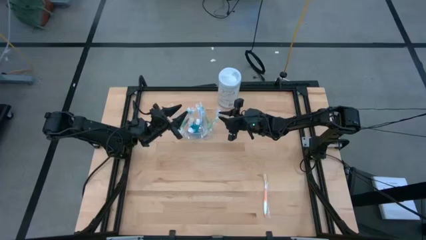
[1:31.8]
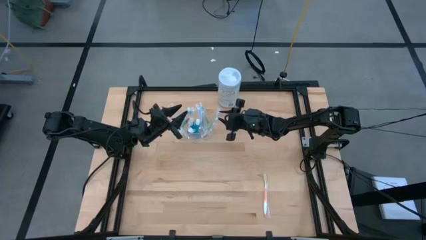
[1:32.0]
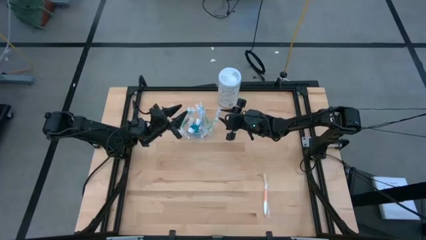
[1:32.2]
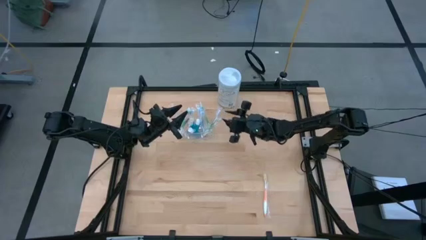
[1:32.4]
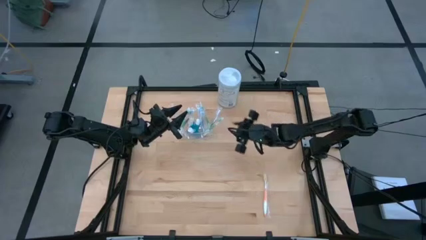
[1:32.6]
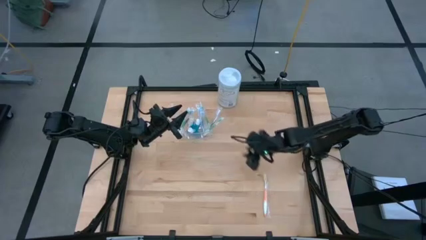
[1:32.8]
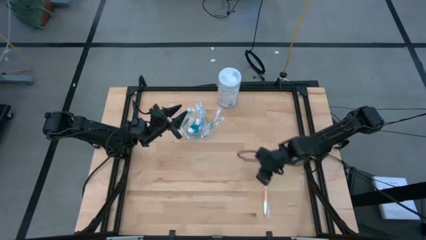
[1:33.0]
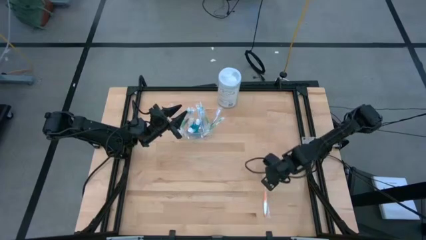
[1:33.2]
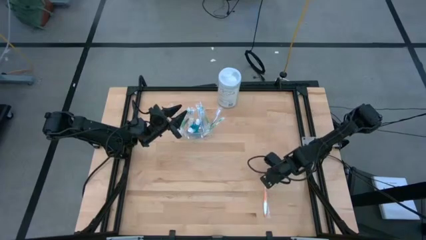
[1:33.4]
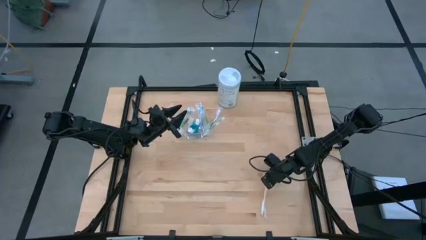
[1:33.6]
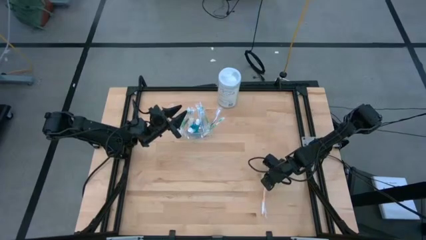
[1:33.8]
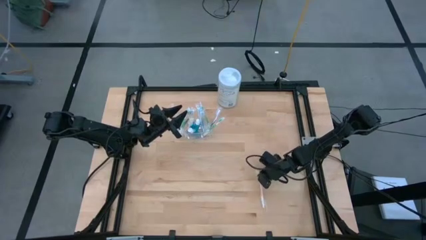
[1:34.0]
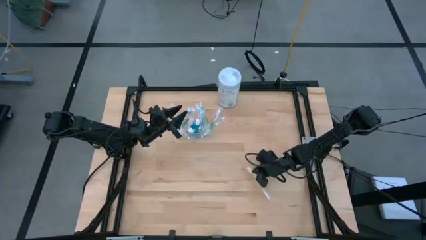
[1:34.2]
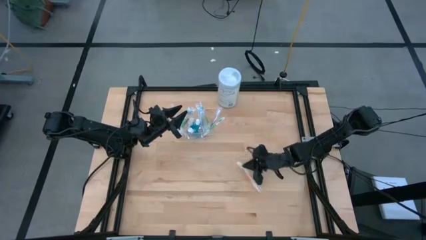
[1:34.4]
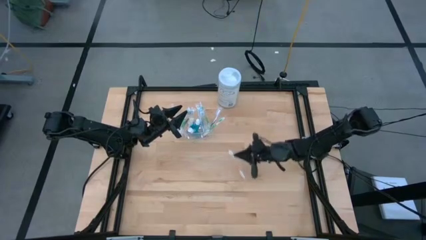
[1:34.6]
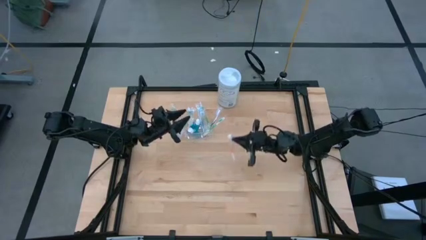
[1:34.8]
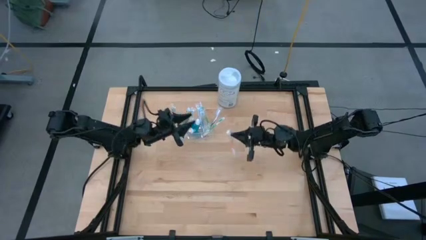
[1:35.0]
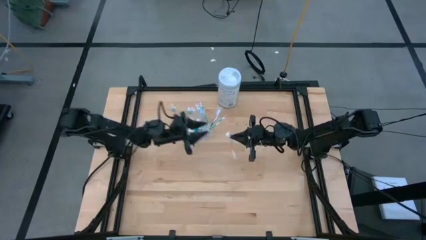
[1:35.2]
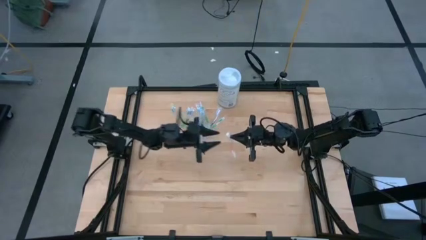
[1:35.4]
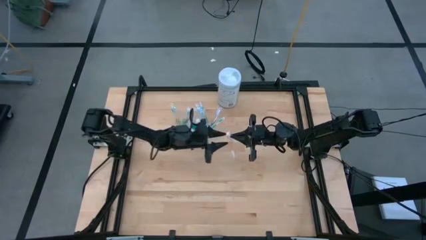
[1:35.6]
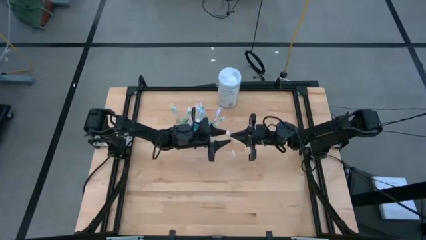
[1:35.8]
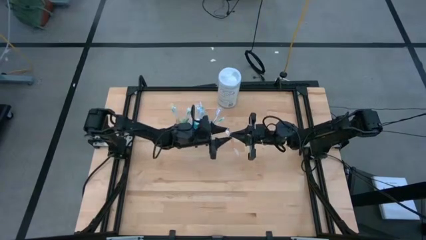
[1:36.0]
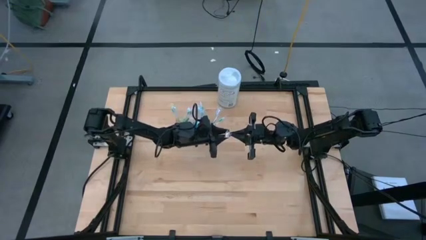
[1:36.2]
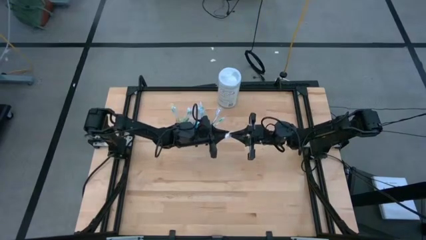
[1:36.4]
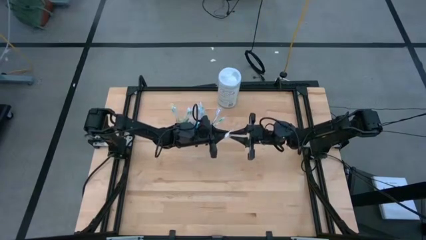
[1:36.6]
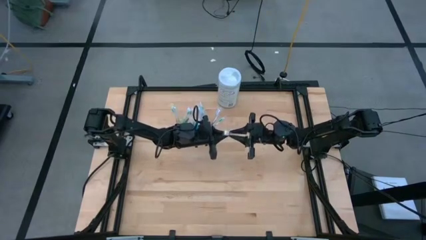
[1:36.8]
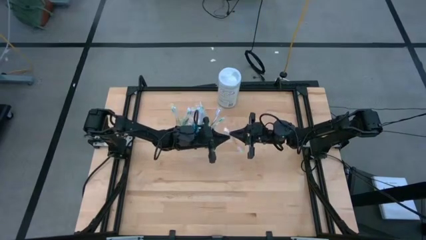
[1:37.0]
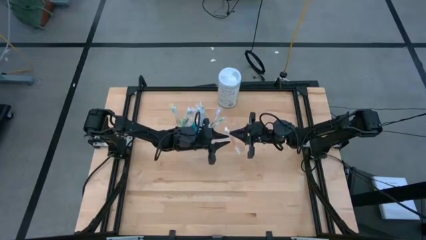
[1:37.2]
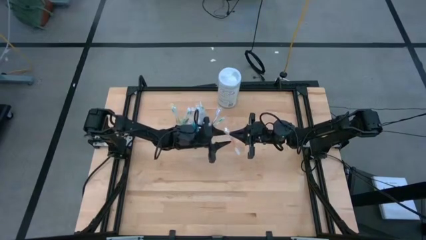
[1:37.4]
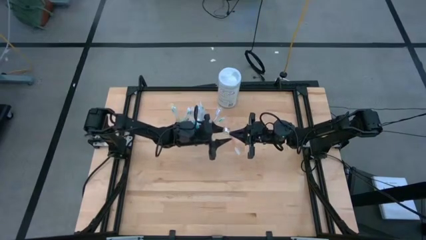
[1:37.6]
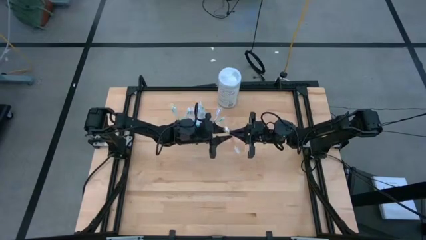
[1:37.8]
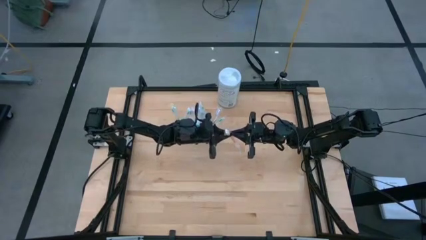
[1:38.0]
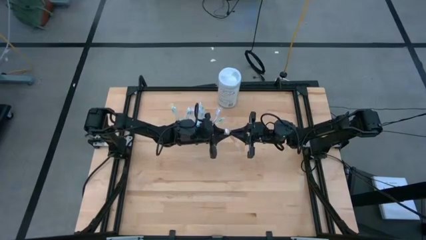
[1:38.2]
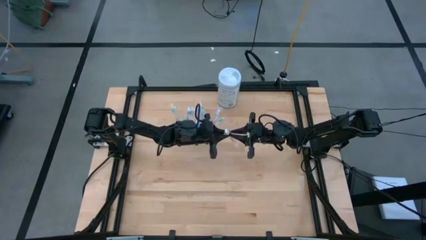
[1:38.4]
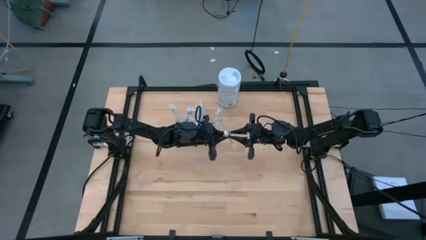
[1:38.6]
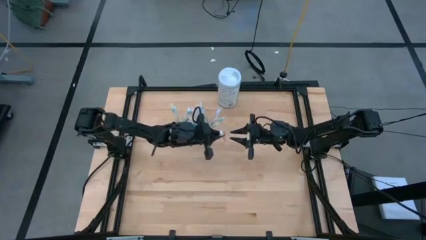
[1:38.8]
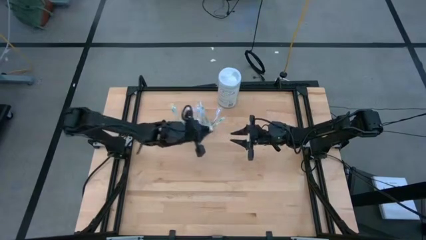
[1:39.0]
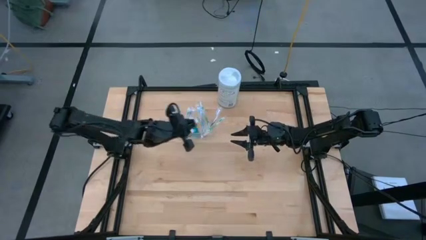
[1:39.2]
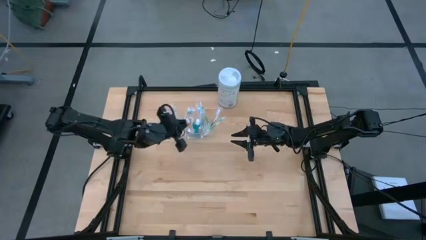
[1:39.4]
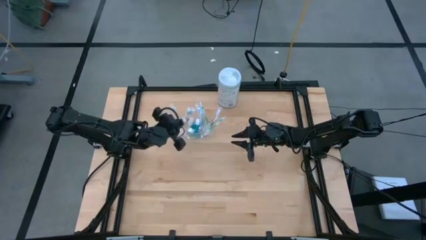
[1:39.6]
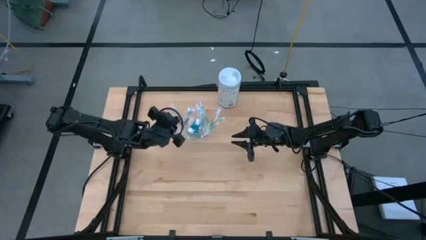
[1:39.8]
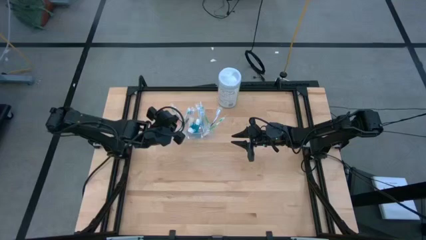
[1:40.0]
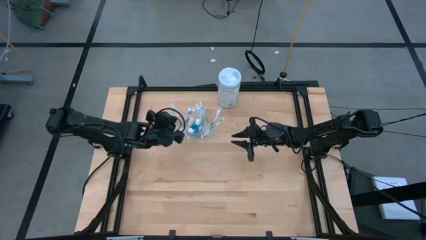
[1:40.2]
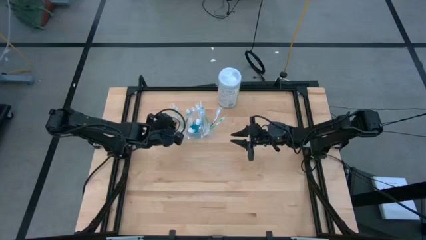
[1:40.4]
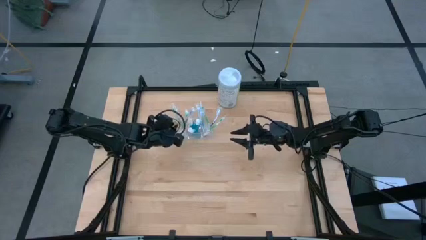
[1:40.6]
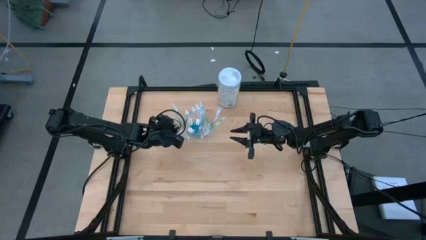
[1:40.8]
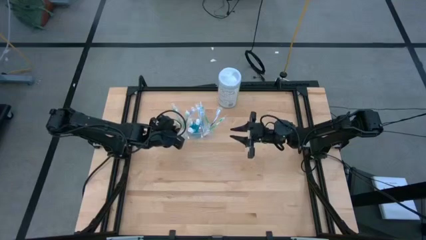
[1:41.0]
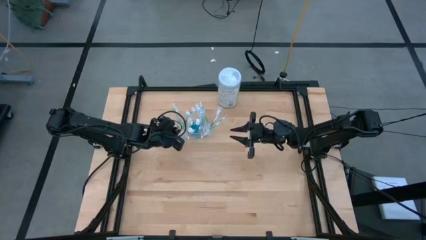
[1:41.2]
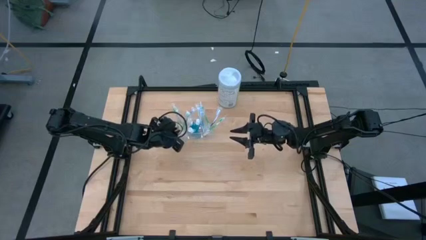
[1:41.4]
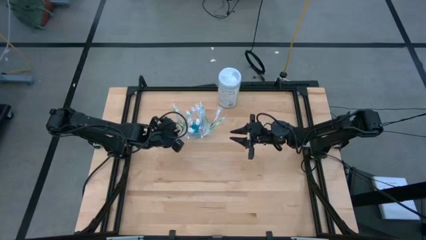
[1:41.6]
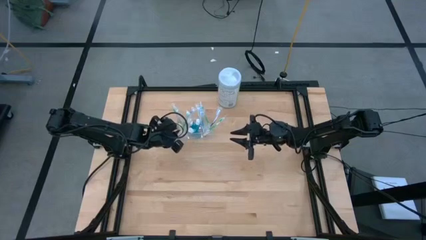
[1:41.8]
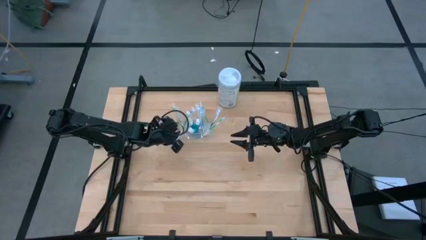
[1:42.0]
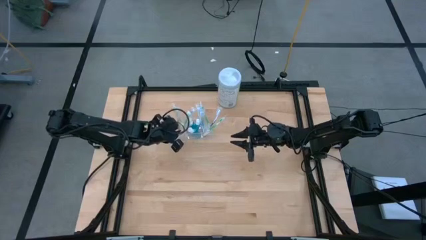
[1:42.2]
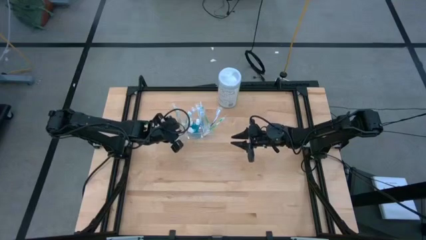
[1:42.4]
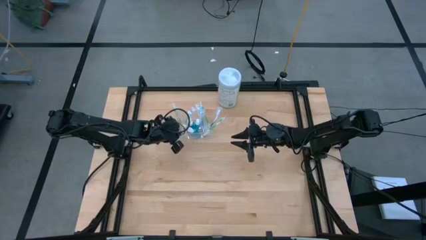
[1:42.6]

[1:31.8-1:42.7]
Task: Pick & Place toothbrushing station
Put the orange toothbrush into the transparent organizer

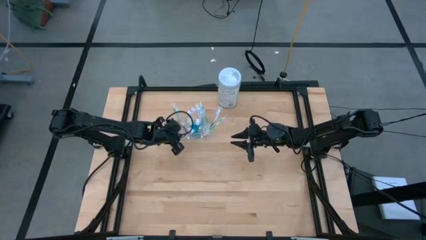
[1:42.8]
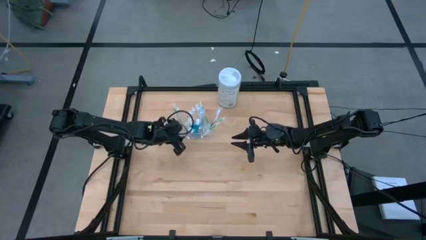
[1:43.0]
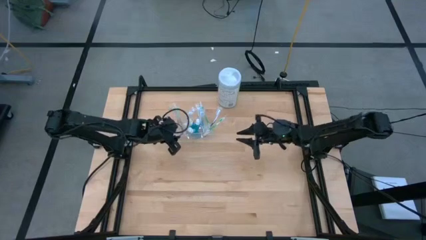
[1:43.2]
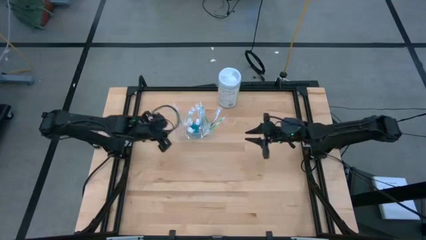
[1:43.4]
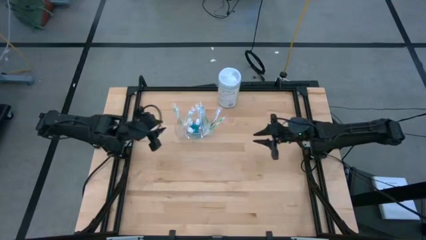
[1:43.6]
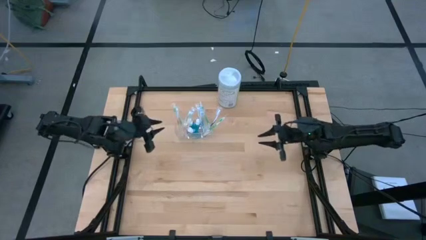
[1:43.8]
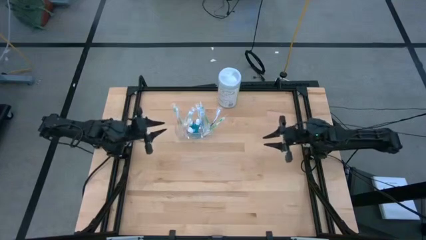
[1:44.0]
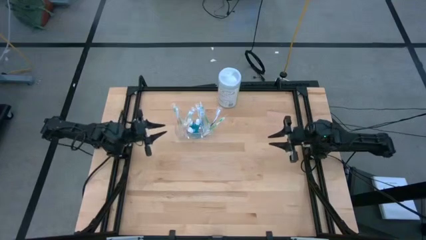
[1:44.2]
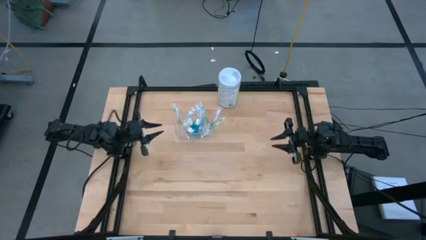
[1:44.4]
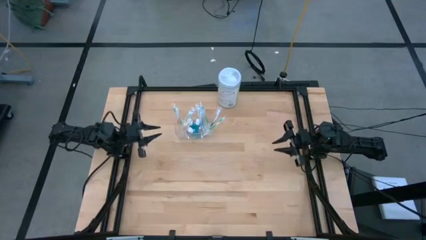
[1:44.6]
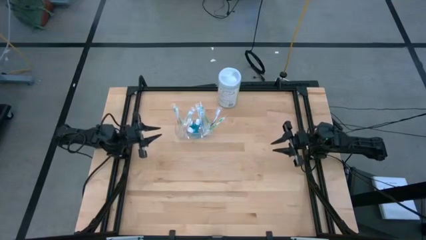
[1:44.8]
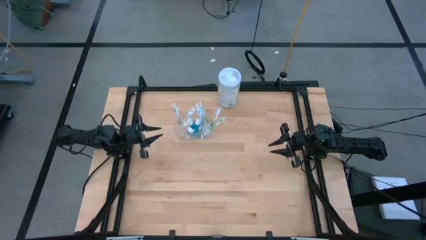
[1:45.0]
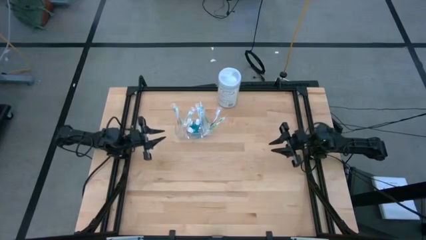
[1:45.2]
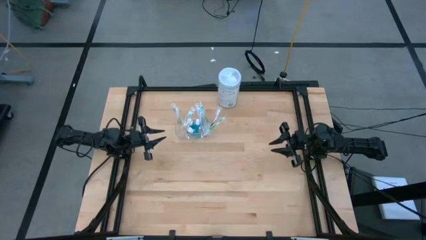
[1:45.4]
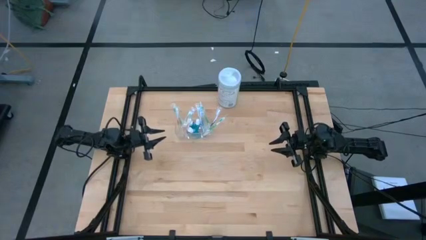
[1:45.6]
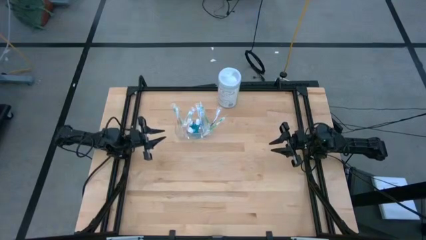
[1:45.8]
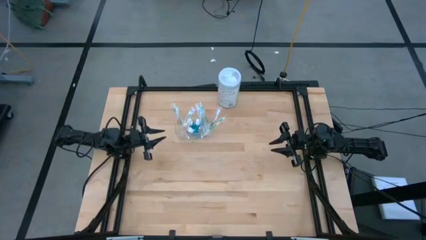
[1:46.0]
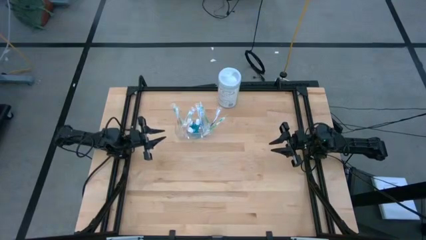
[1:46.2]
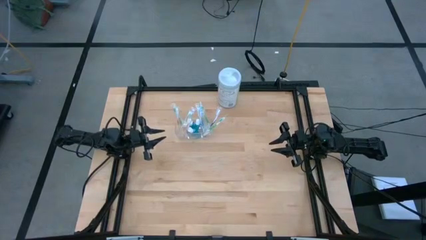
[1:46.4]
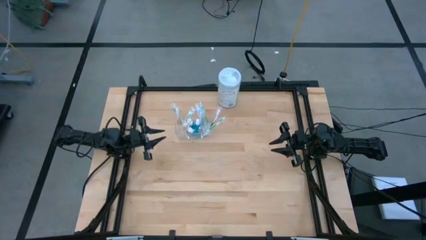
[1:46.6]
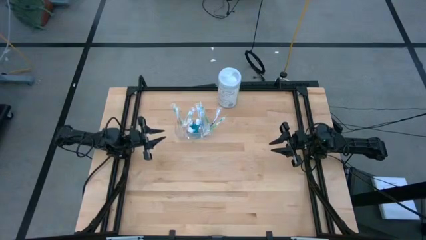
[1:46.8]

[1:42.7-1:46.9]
Return to Home Position
